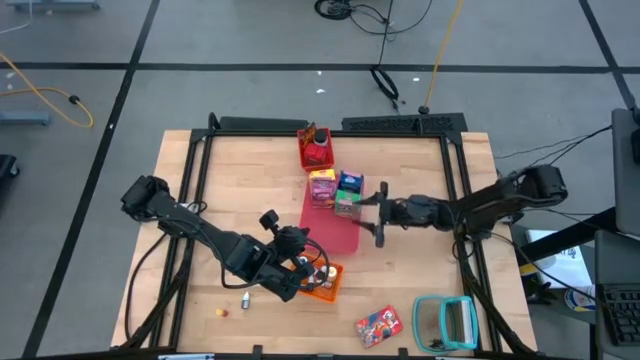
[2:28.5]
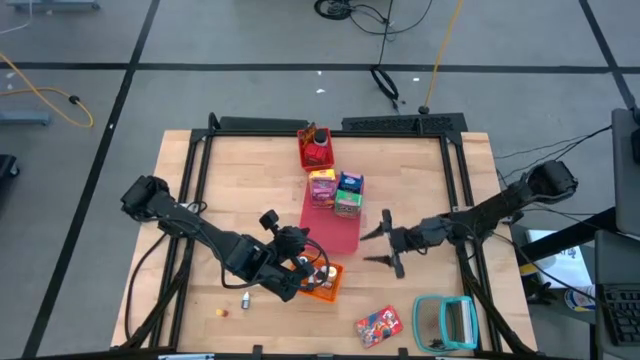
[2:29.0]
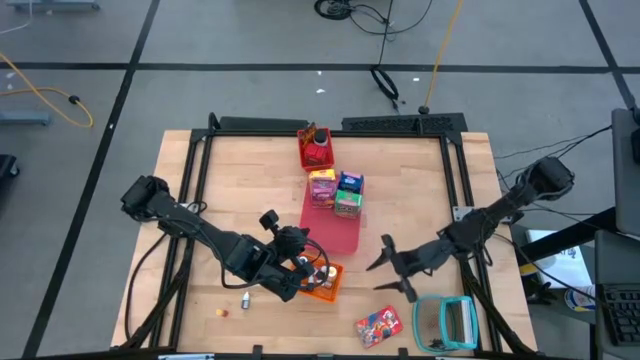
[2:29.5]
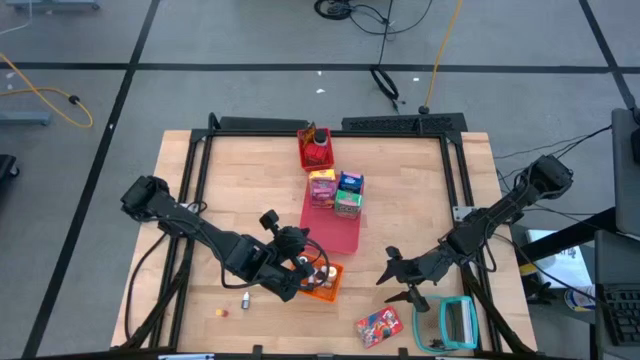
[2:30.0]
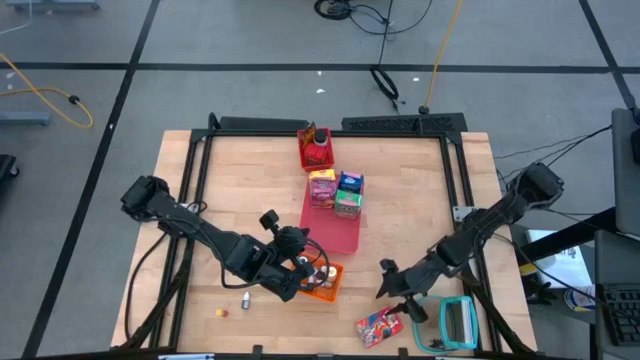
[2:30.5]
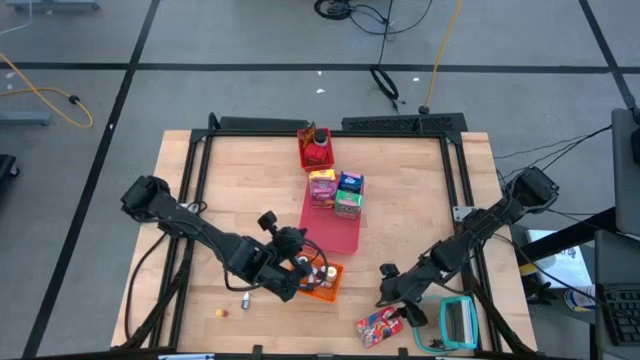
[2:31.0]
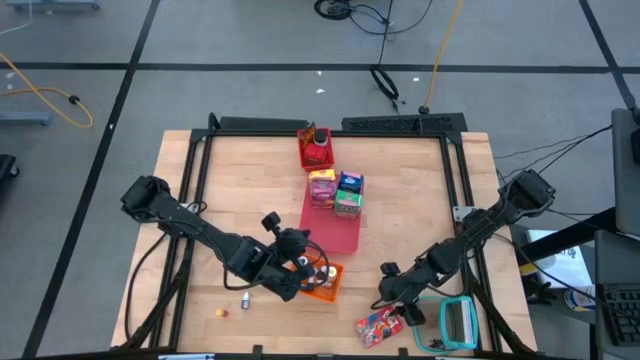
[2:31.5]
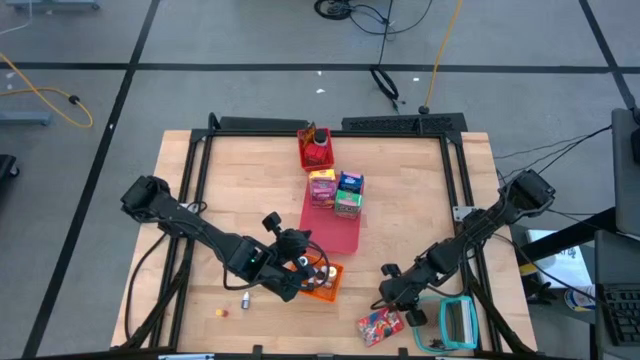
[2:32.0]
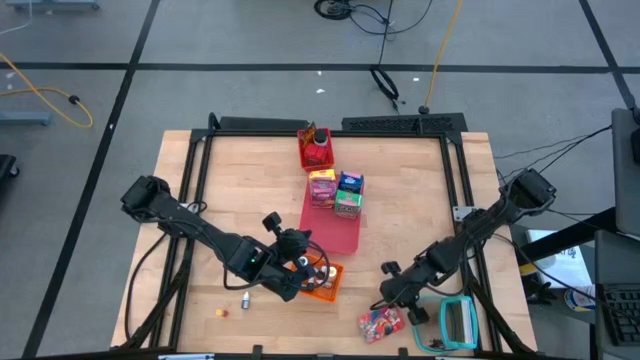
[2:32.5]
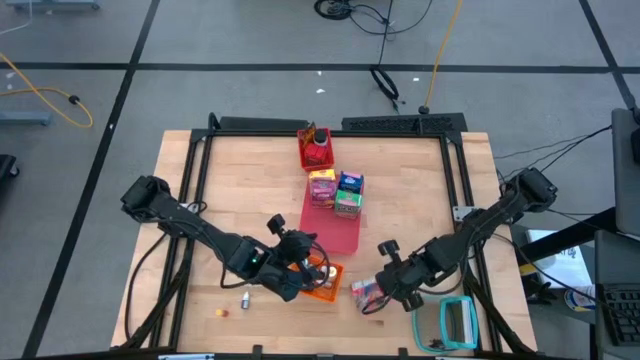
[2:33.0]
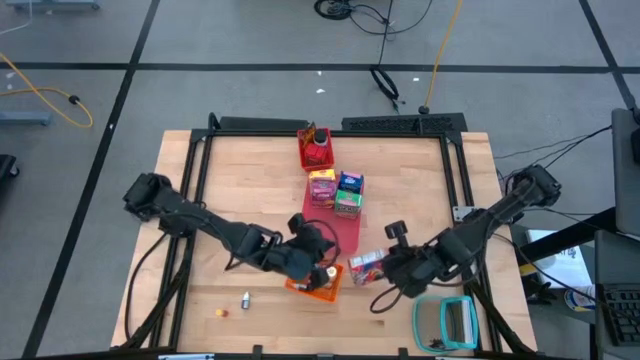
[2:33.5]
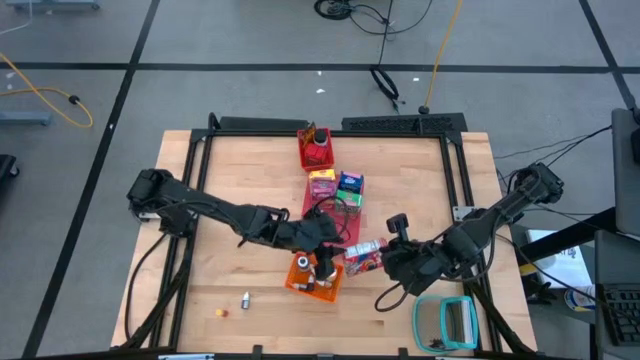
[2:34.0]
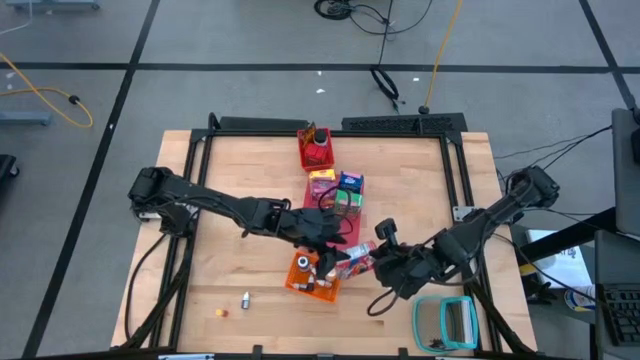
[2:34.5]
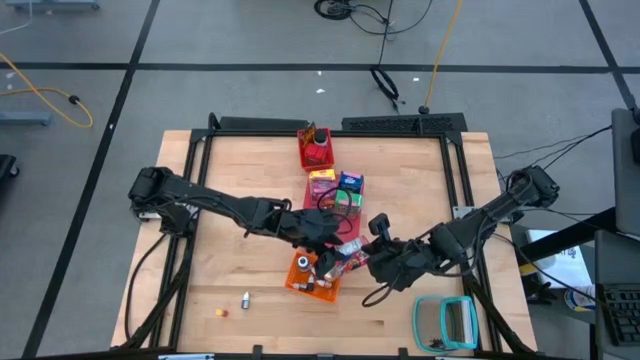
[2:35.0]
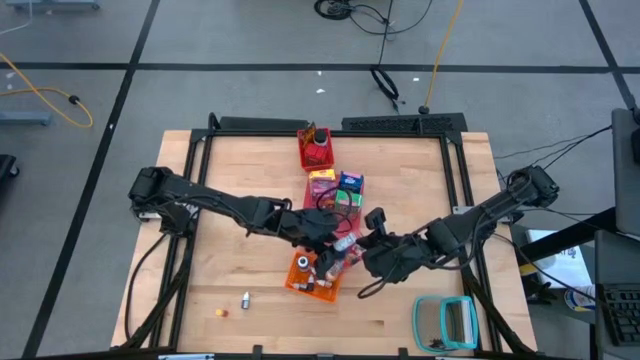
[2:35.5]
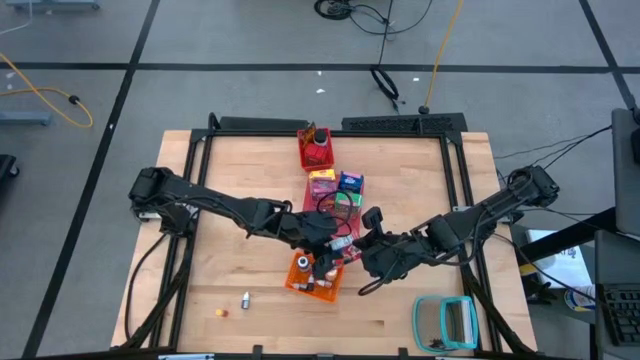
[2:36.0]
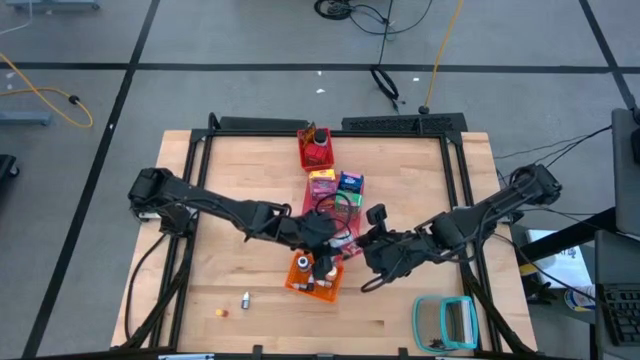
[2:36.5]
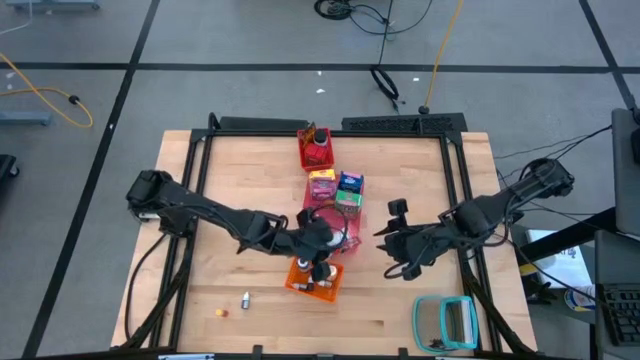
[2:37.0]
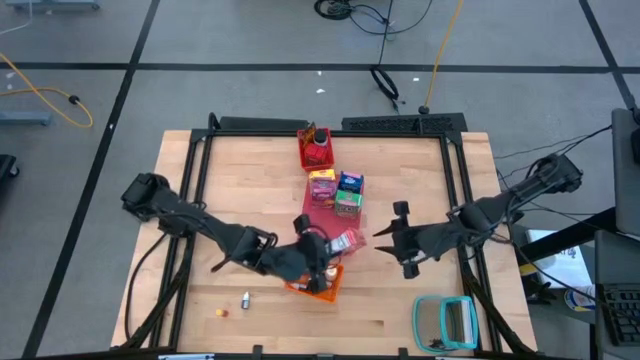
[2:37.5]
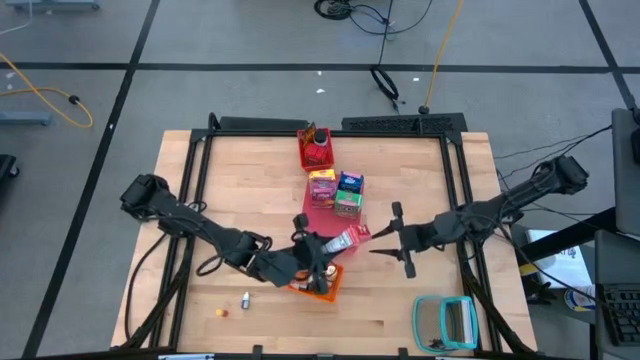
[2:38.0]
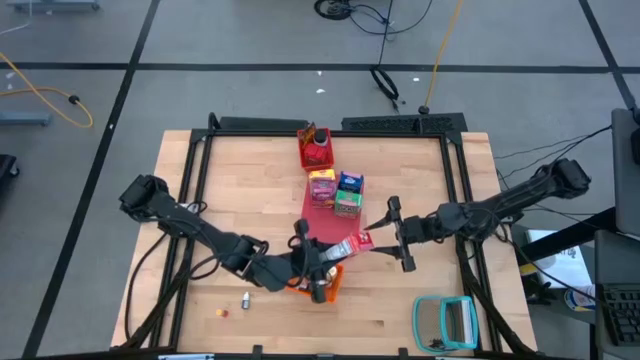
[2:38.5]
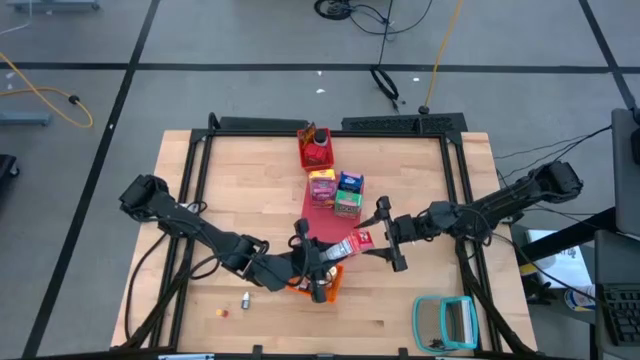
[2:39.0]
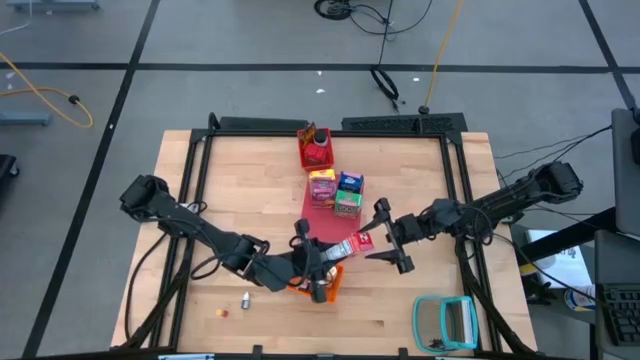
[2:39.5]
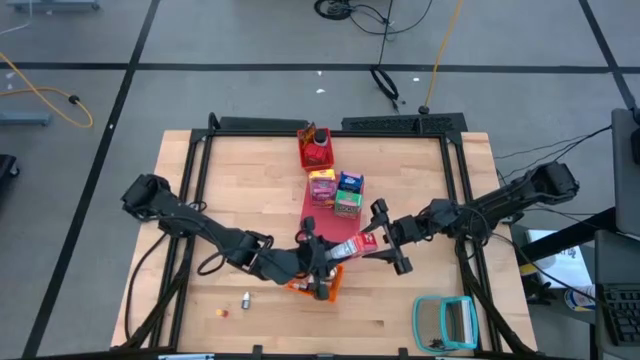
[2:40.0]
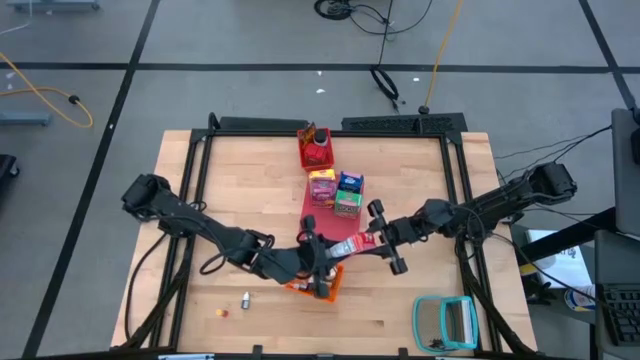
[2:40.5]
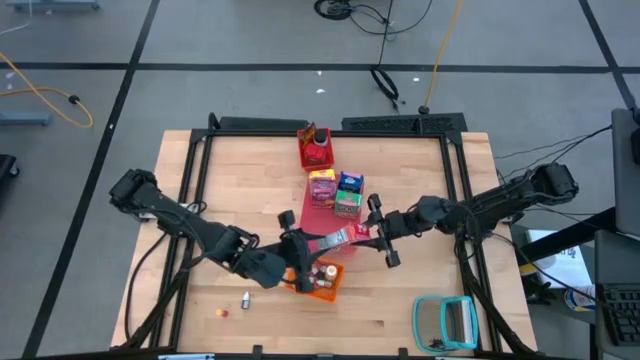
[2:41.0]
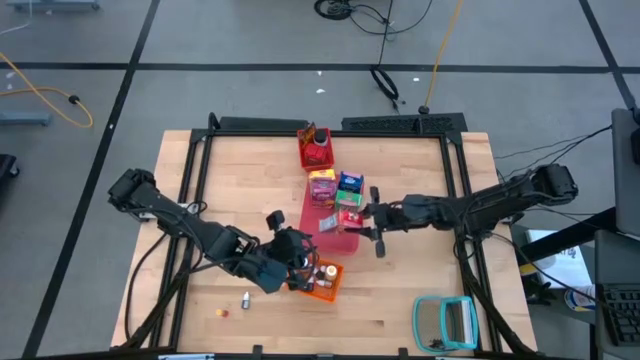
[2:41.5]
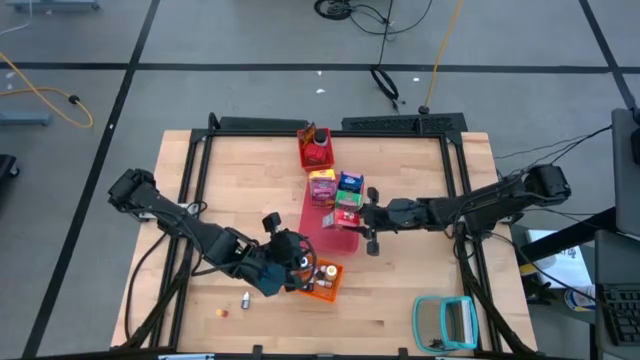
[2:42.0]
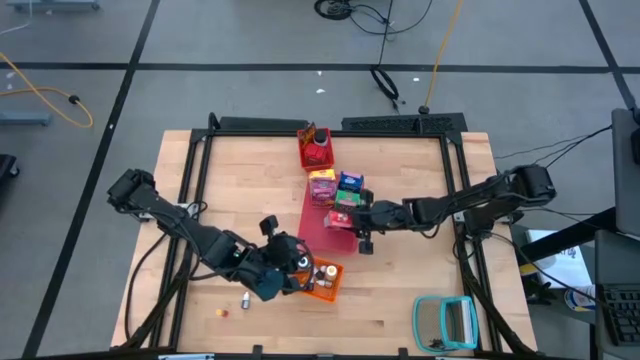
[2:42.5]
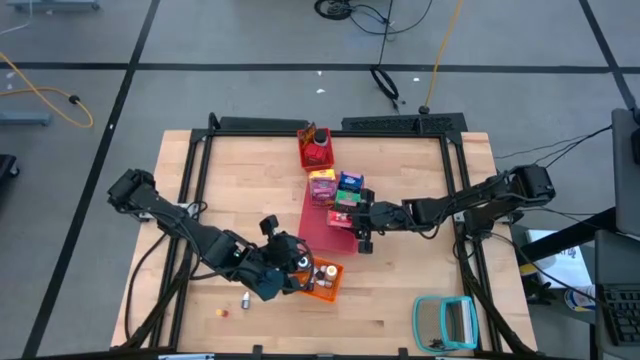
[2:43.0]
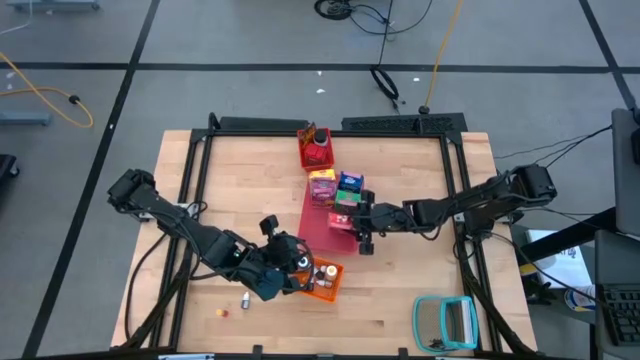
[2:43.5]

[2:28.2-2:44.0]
Task: Pick & Place Kitchen Items
Put the red cereal box into the red bin

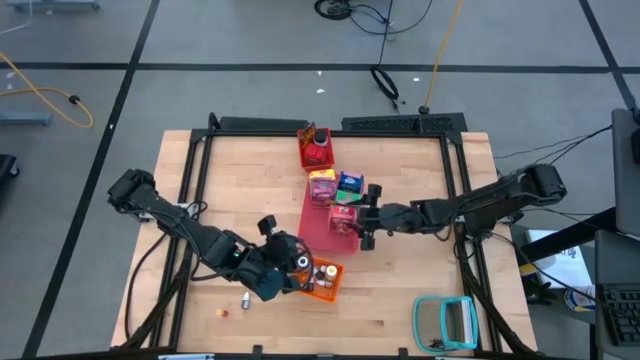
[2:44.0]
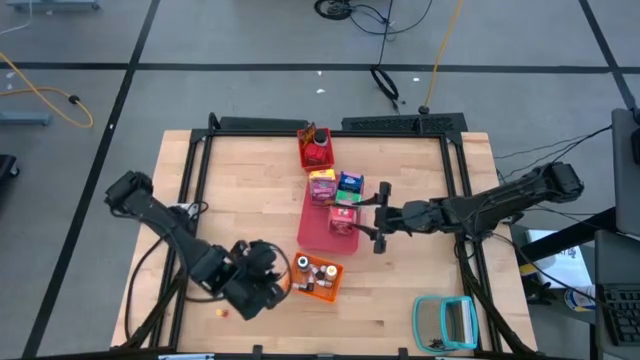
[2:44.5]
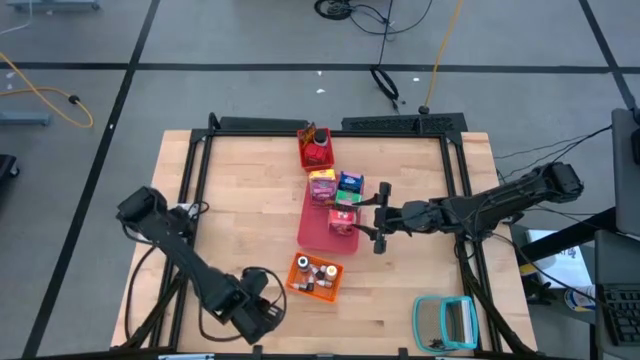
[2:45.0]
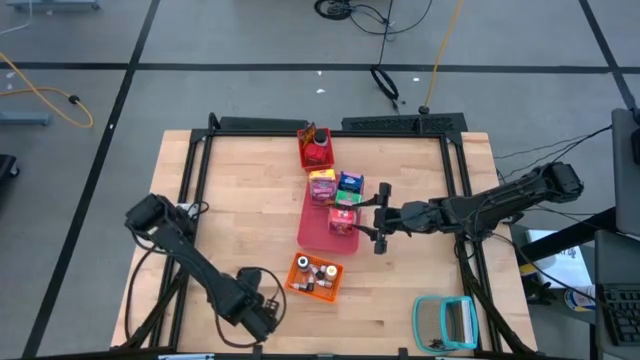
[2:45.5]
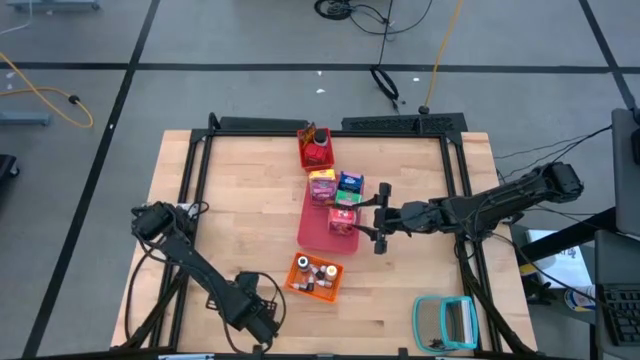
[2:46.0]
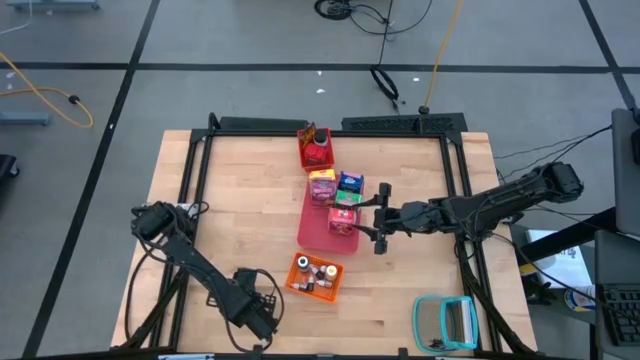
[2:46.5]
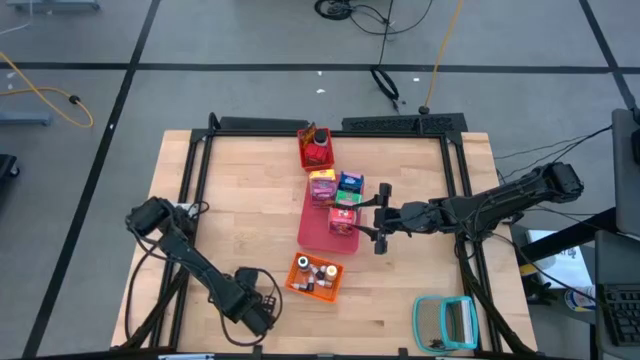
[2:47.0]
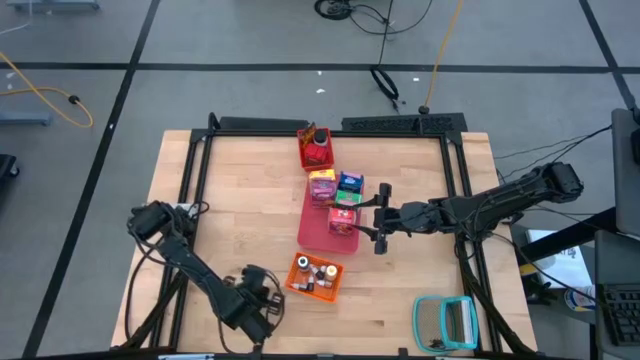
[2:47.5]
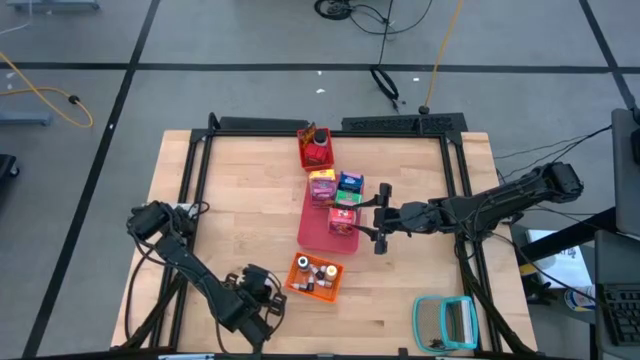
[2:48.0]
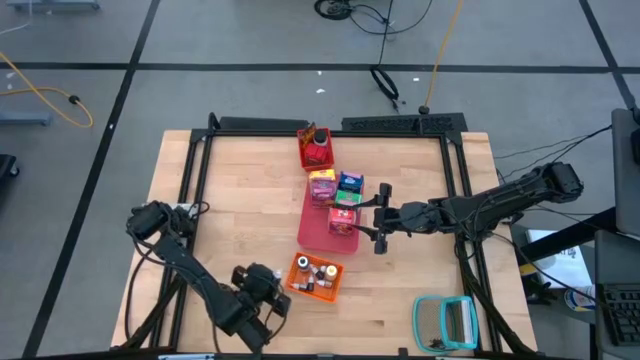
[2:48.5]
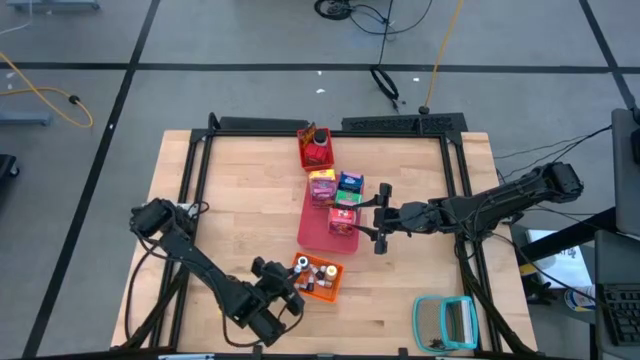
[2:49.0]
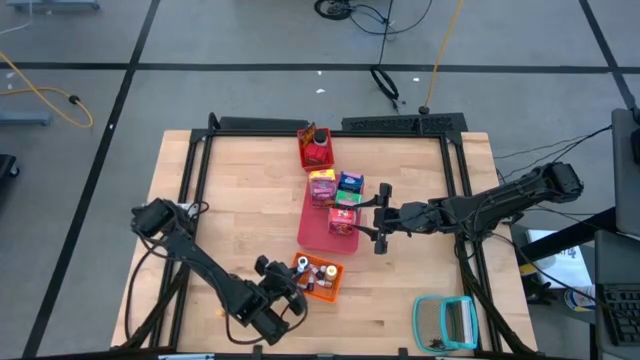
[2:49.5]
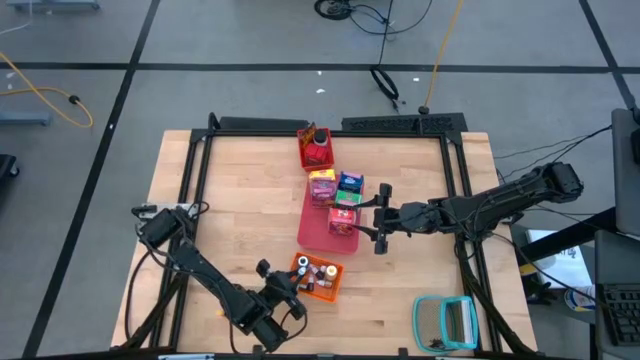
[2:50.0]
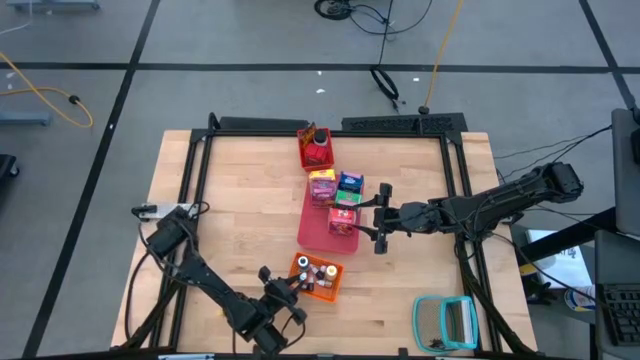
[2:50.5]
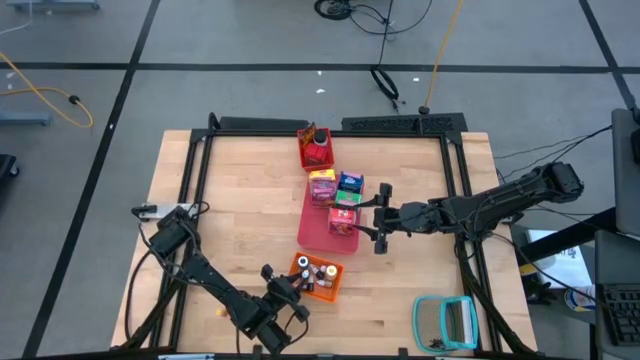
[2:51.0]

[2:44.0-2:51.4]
Put the small violet food coloring bottle into the orange bin
